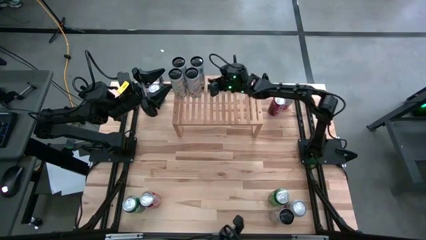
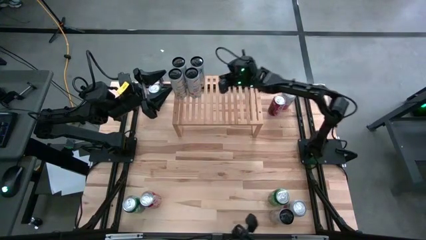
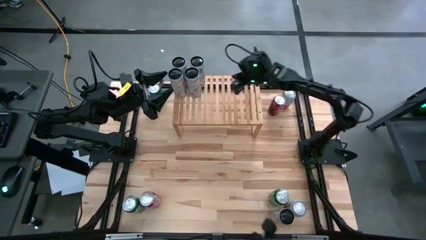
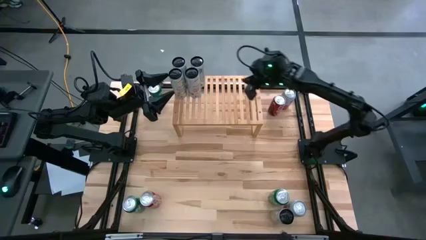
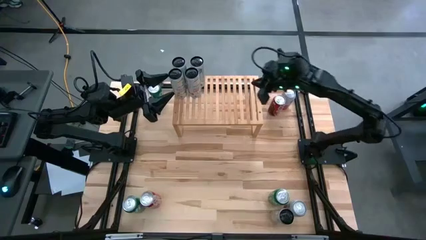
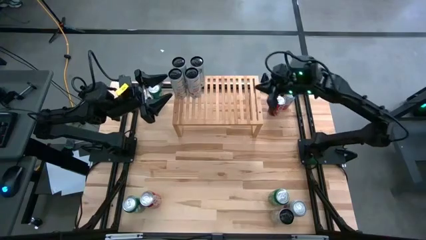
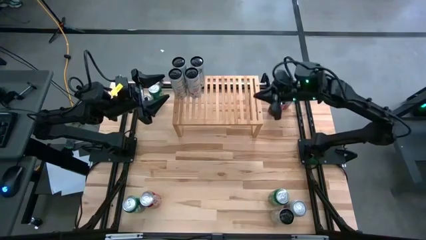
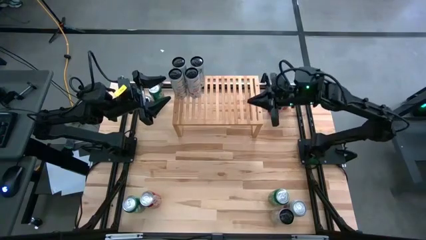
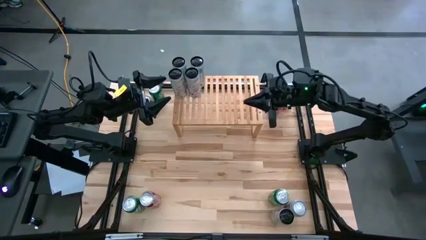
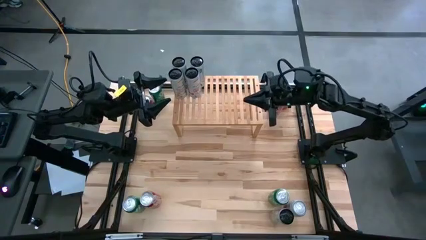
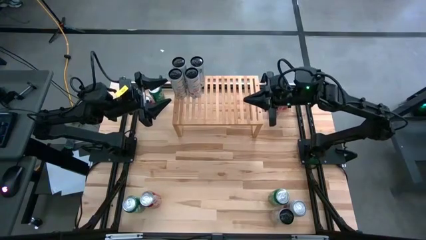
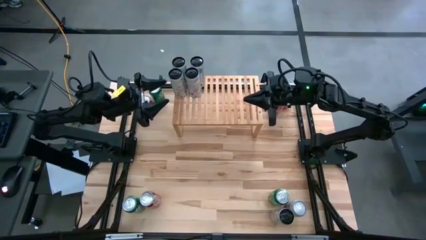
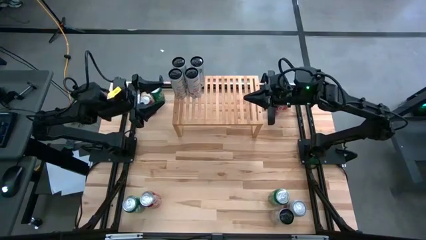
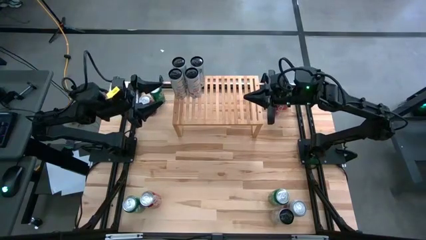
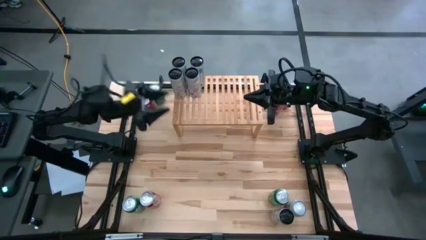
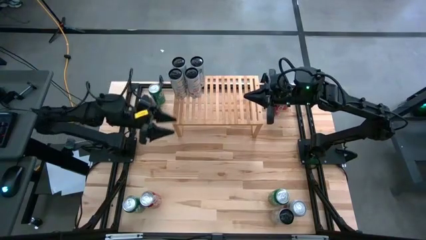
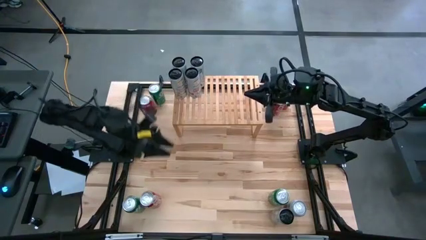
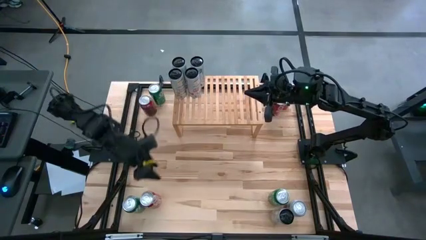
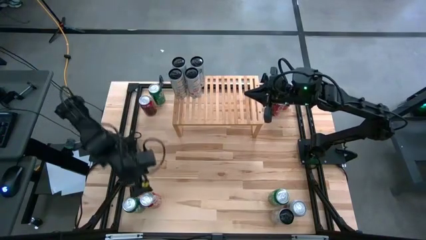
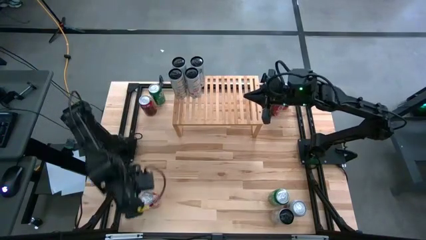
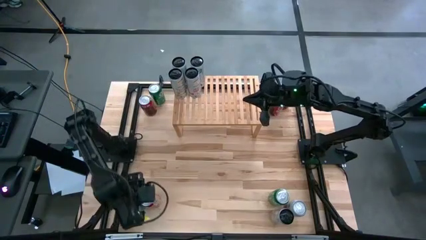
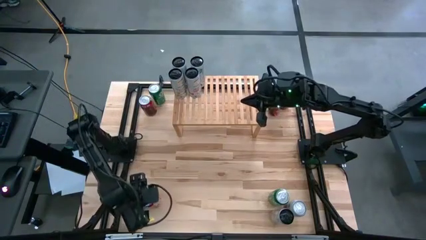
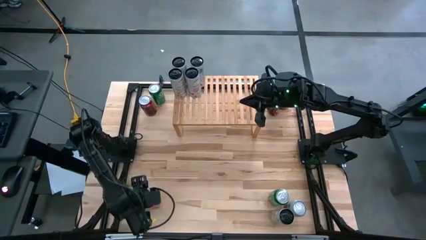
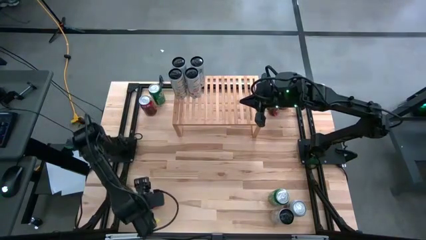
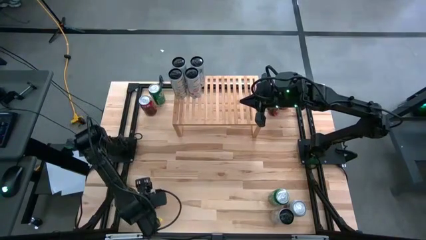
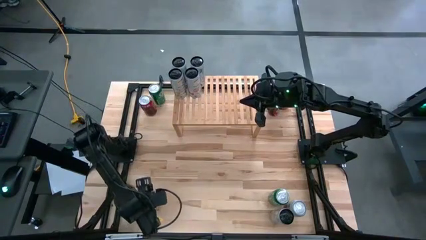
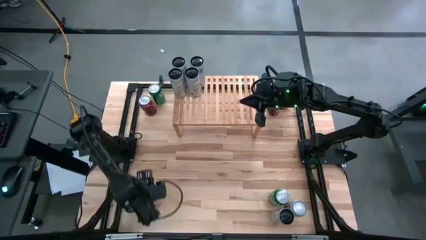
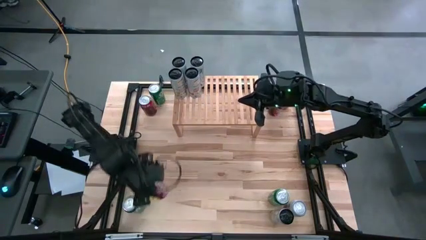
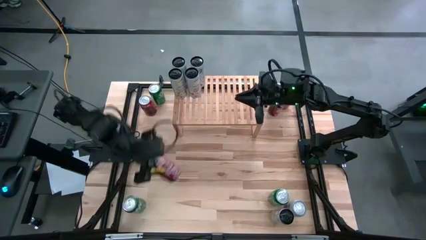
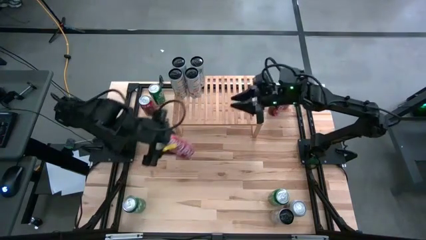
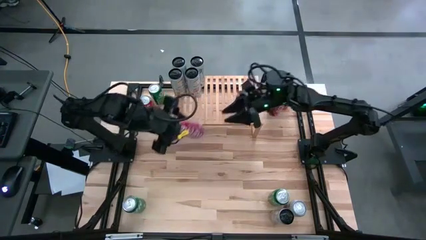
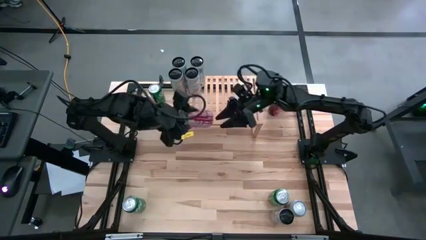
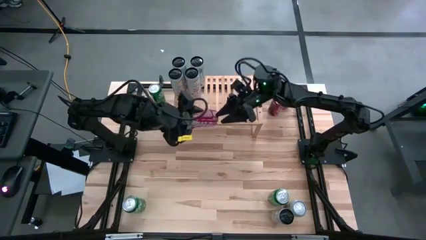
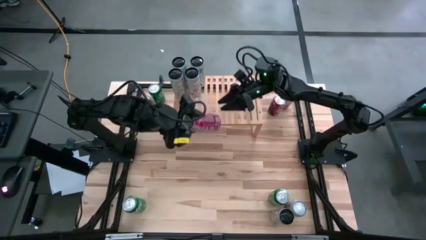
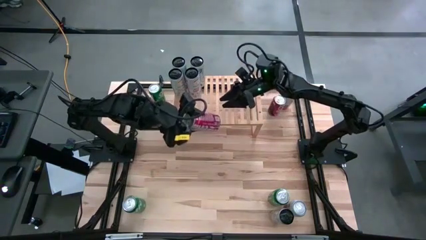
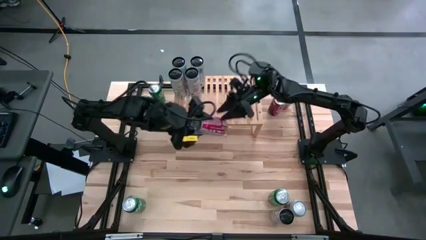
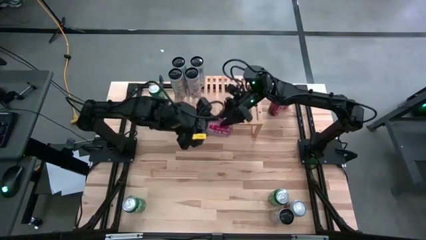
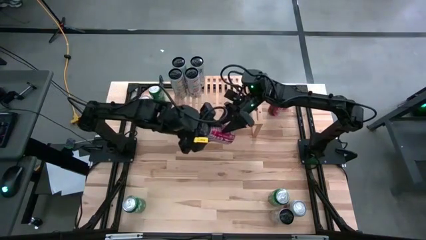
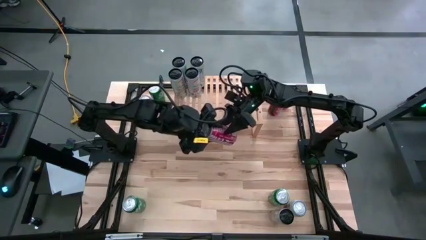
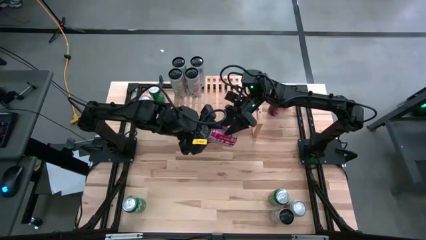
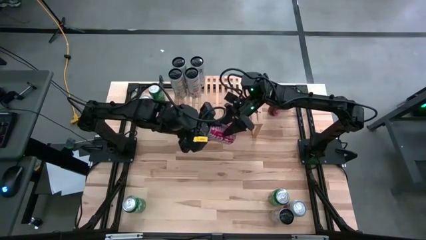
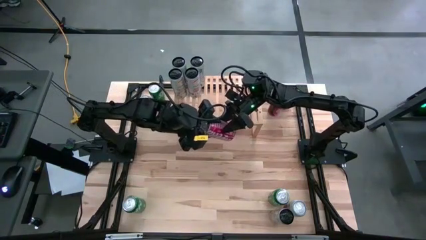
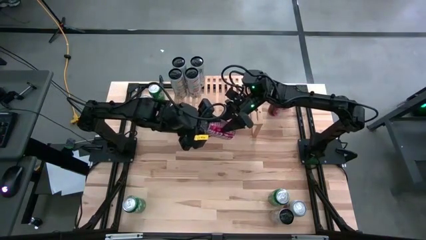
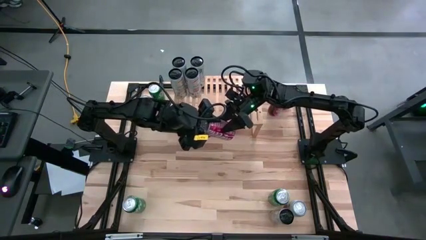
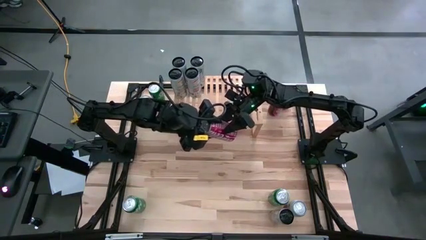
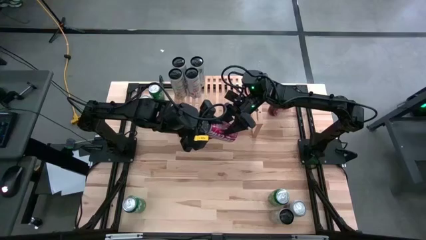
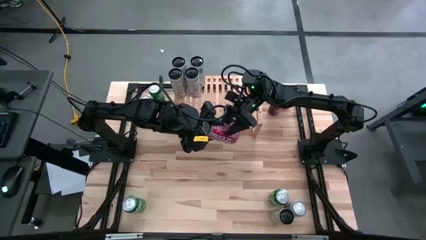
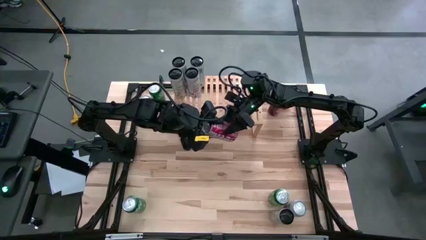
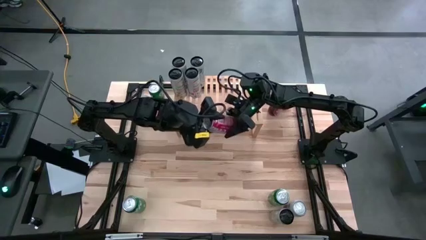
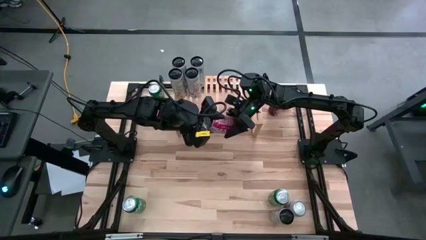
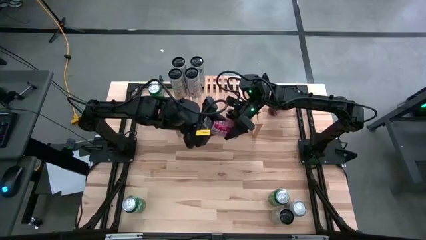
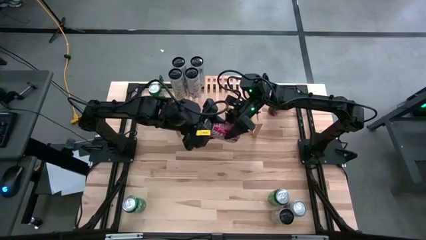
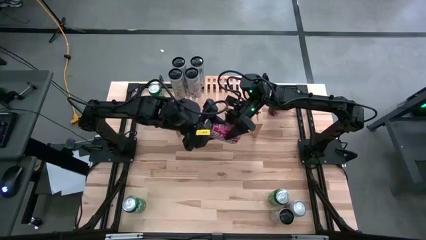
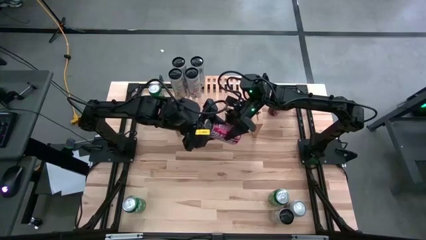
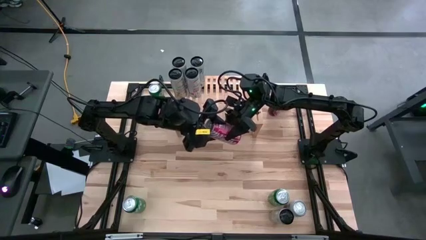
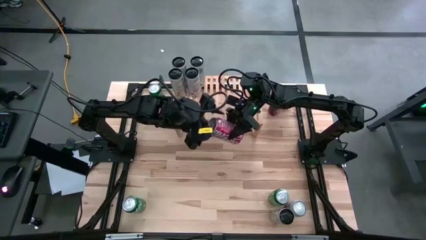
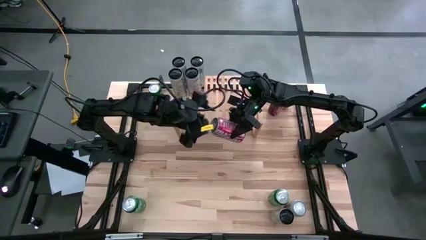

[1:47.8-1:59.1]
Task: Place canned beverage on shelf
Put the bottom red soda can on the shelf
